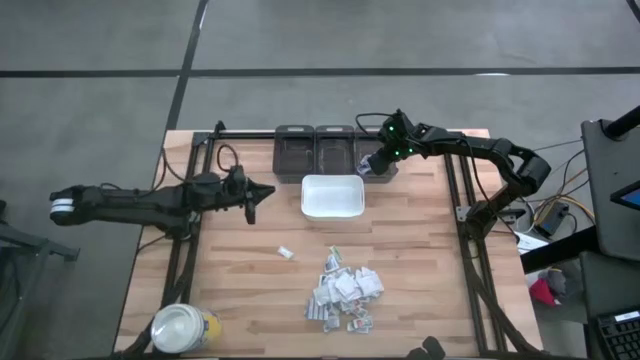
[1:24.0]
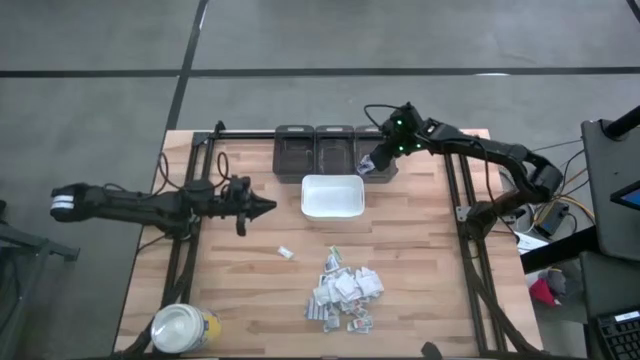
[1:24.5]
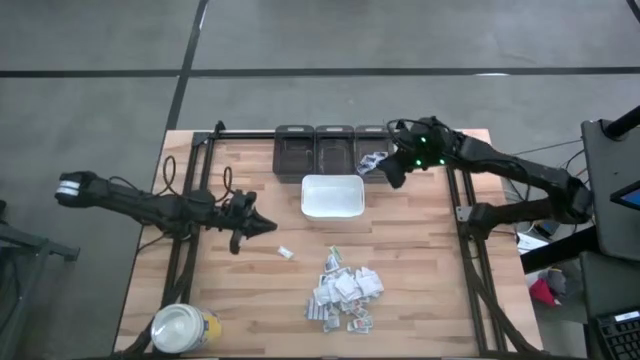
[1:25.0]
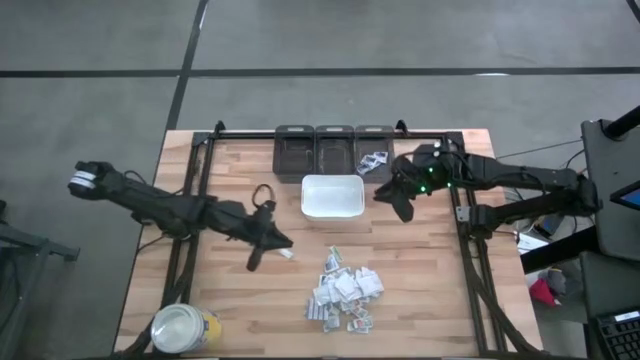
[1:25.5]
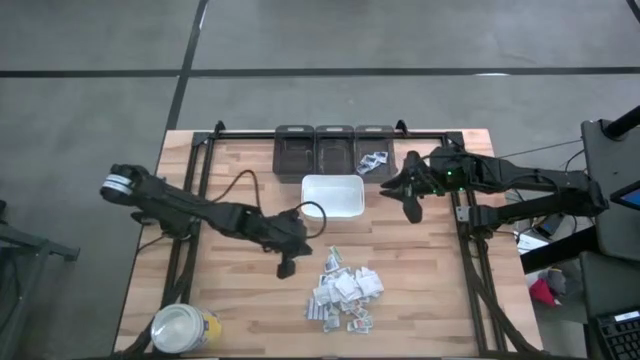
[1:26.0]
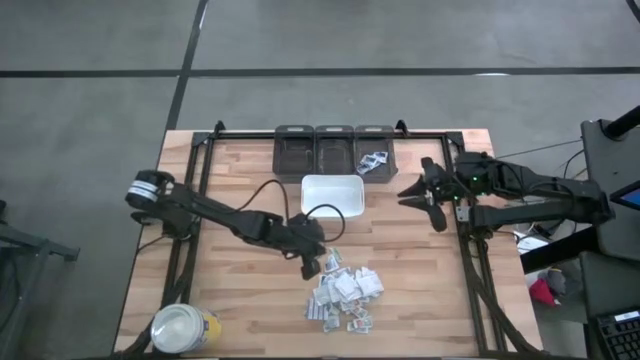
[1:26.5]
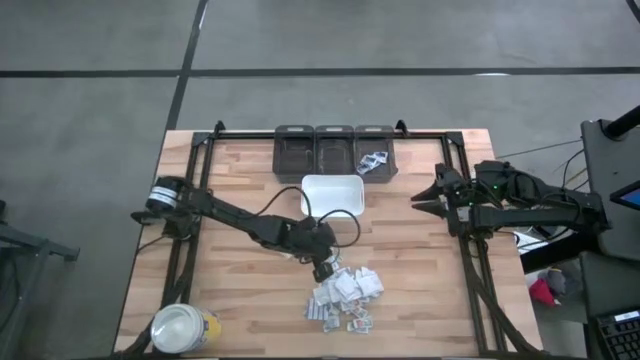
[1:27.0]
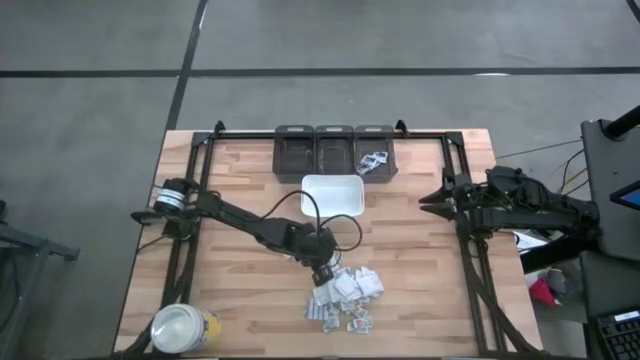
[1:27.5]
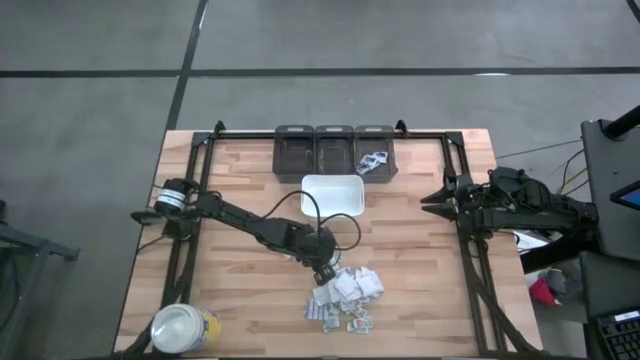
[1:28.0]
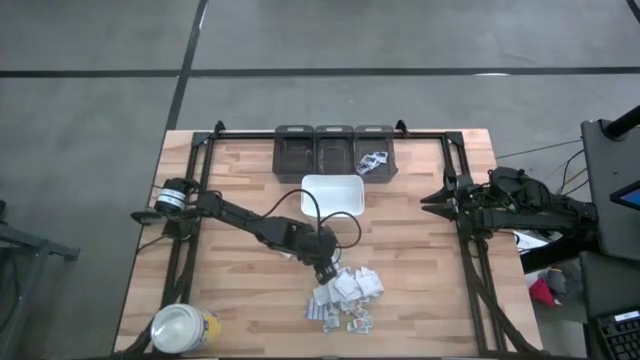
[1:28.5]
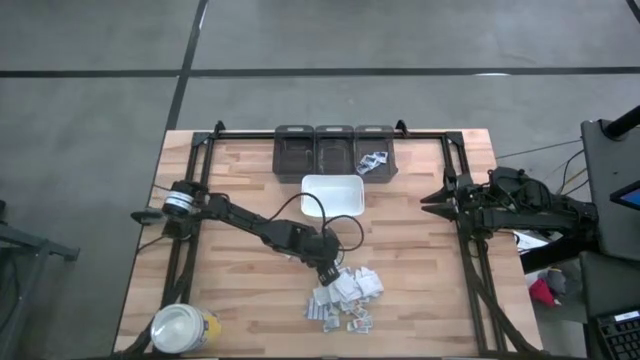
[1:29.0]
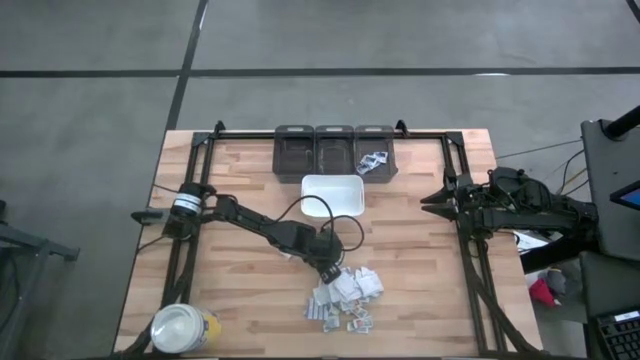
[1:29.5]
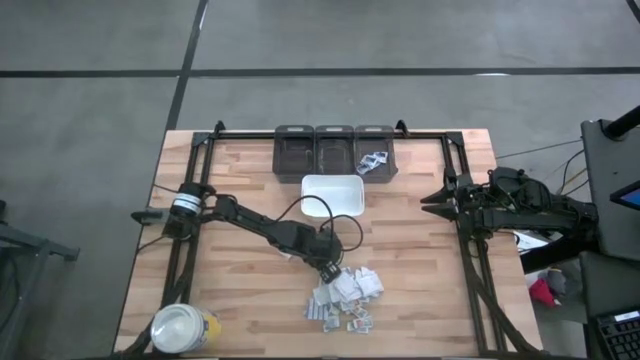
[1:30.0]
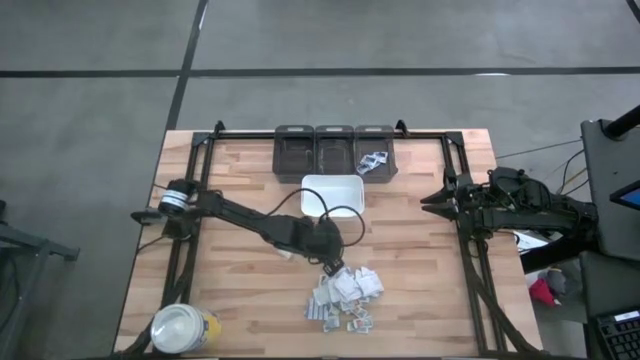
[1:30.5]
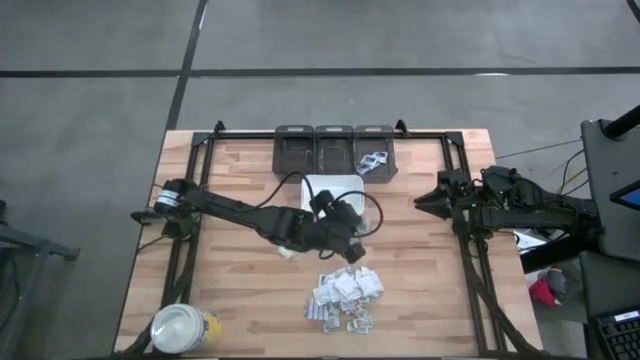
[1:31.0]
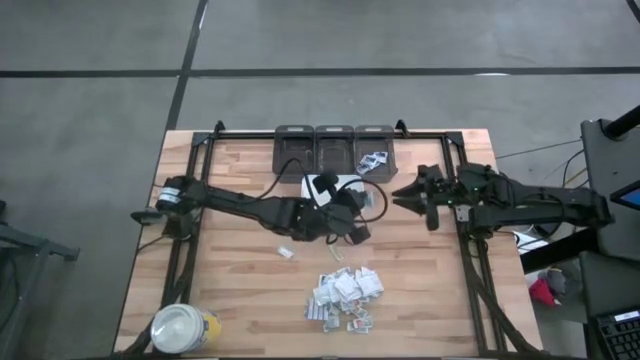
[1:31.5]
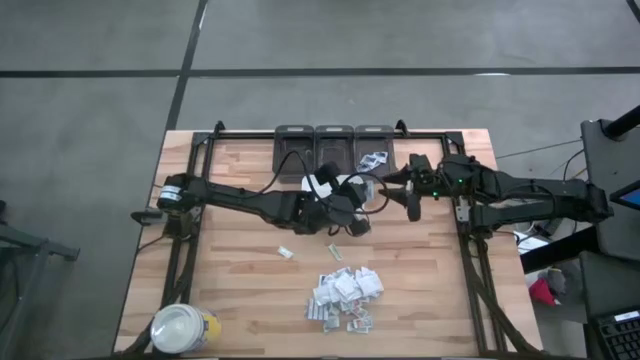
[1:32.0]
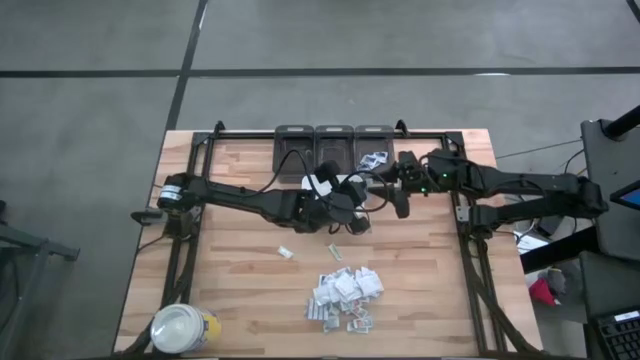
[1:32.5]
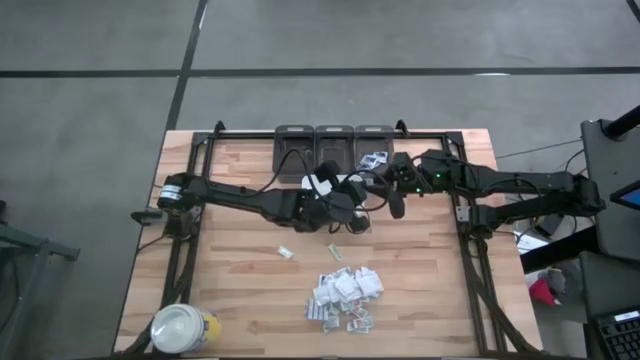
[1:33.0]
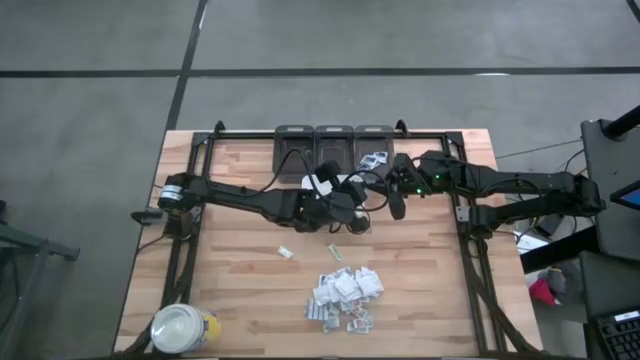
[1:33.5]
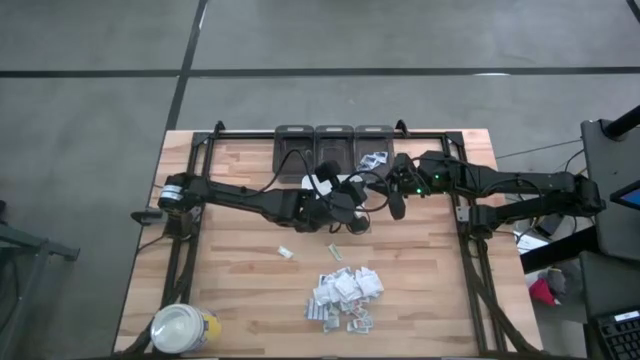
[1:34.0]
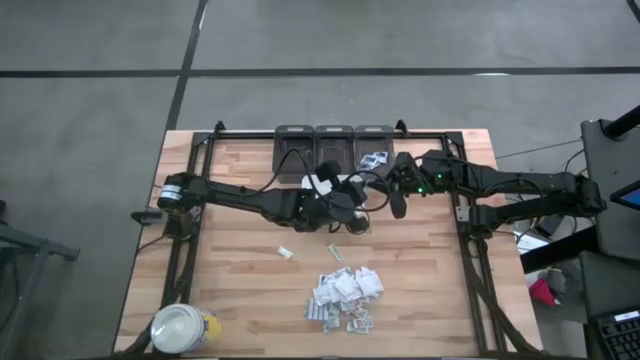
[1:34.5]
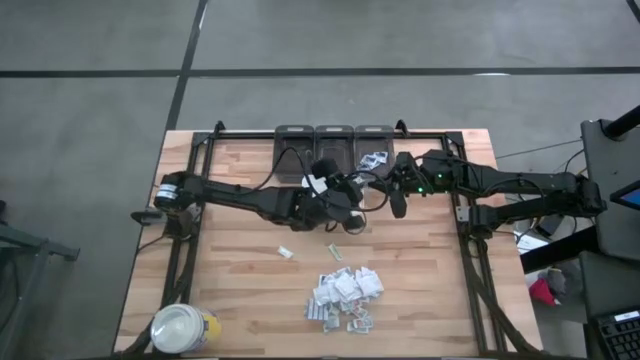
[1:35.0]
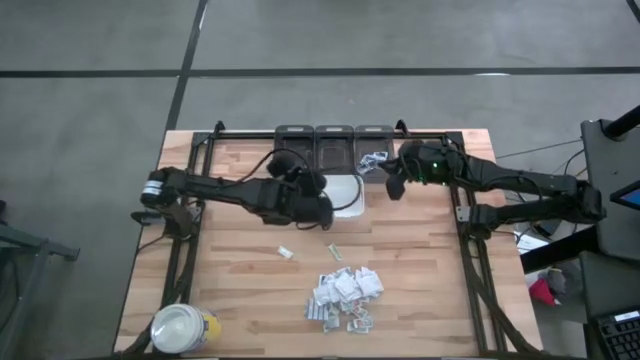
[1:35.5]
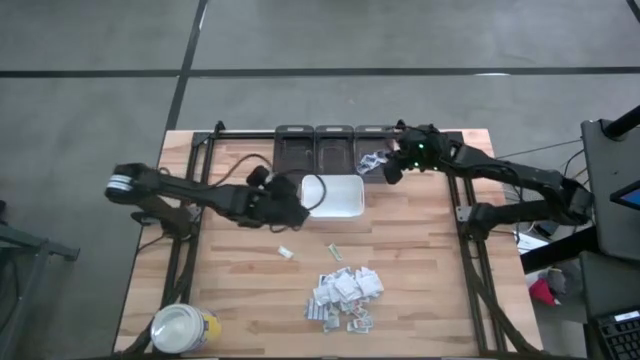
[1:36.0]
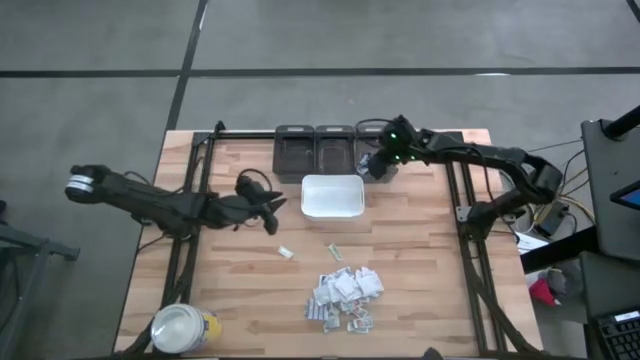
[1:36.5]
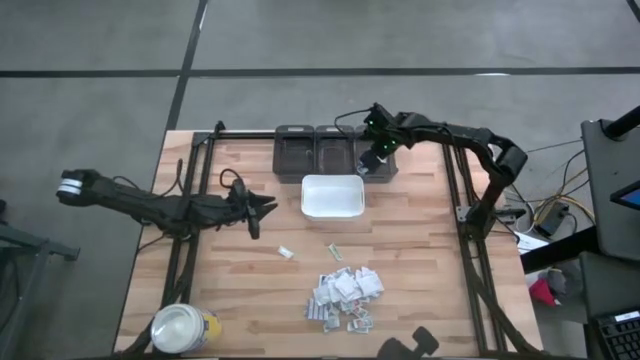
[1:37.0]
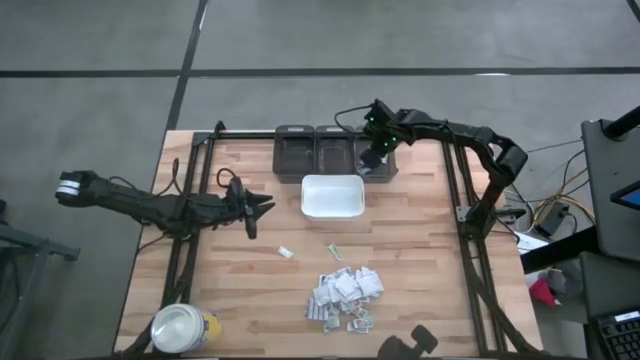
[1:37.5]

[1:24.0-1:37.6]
Task: Pick & Place First Aid Supplies
Put the white alcohol pad into the right black bin

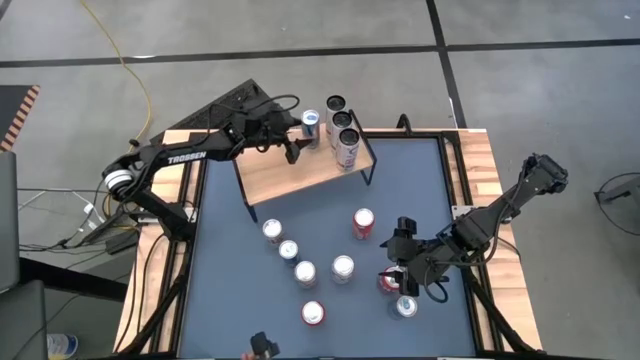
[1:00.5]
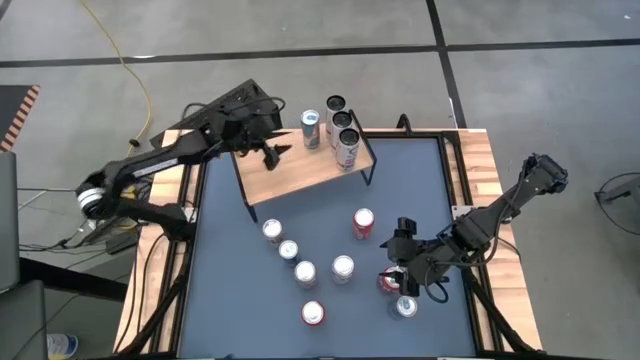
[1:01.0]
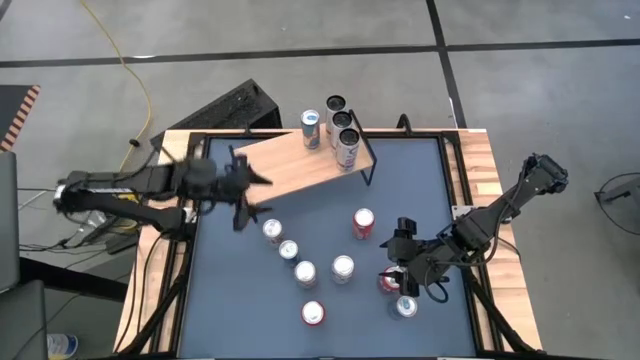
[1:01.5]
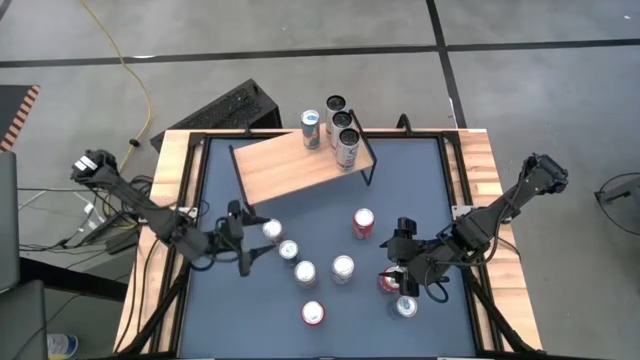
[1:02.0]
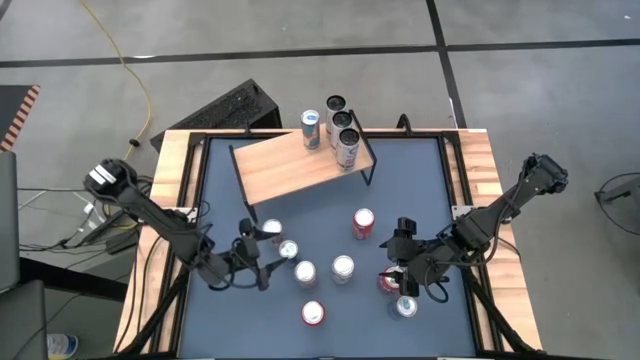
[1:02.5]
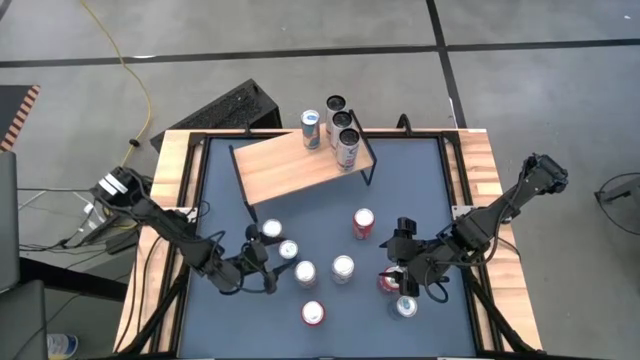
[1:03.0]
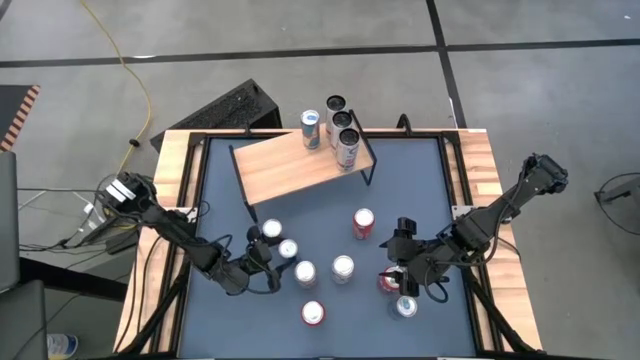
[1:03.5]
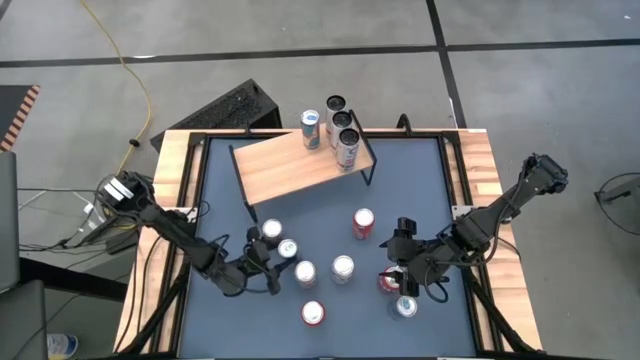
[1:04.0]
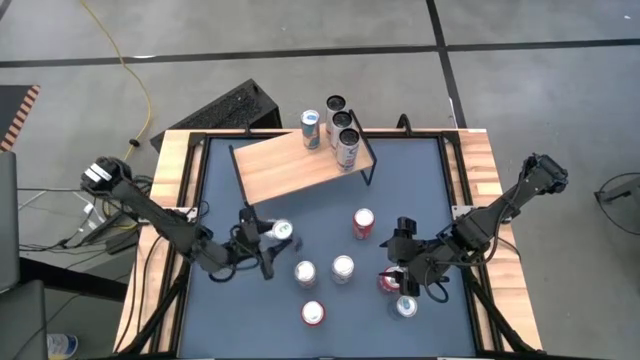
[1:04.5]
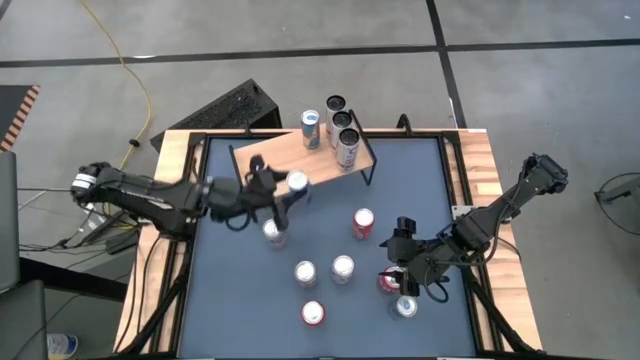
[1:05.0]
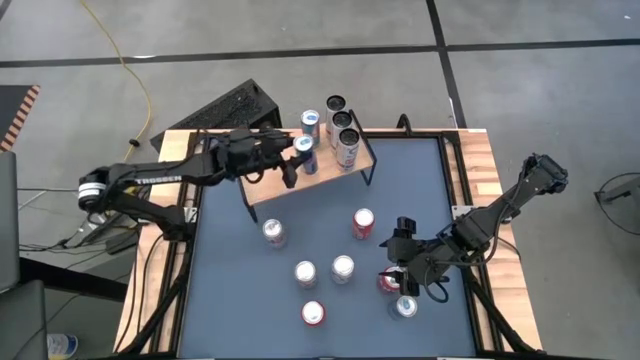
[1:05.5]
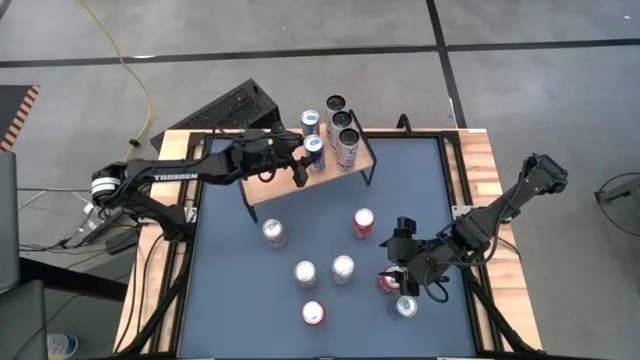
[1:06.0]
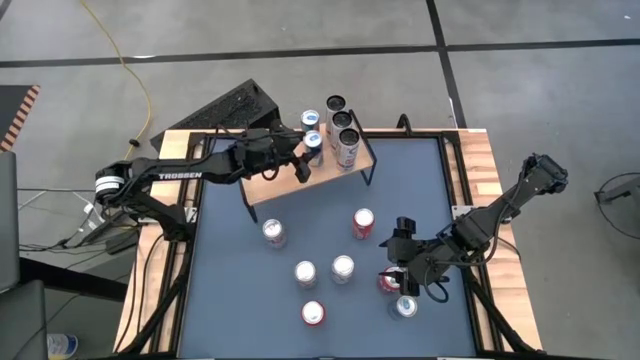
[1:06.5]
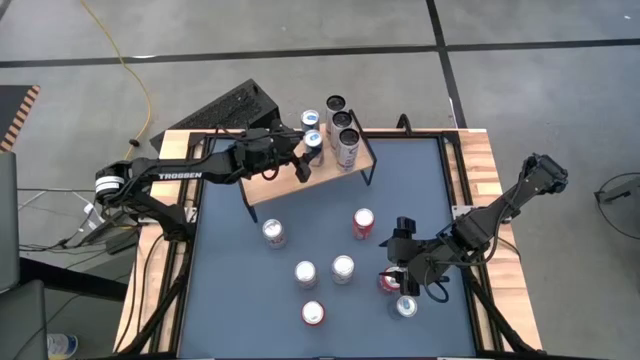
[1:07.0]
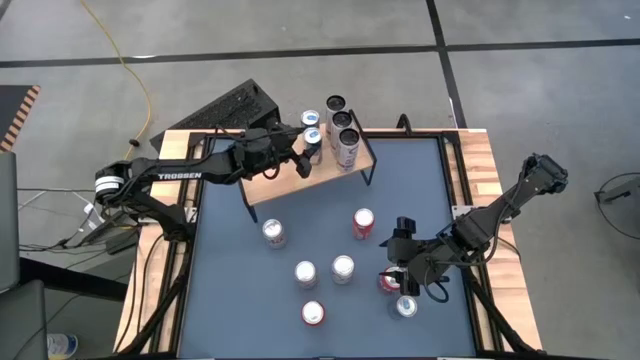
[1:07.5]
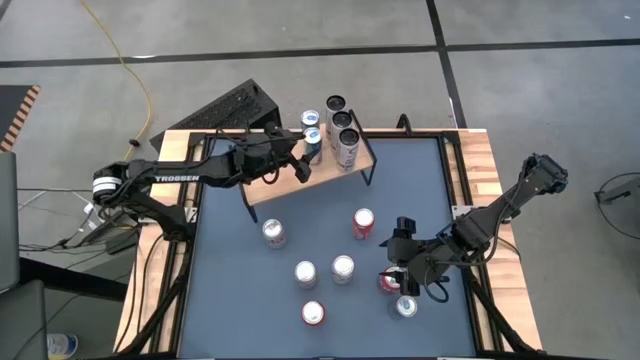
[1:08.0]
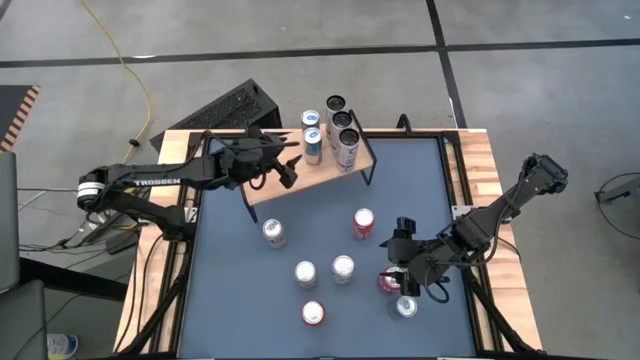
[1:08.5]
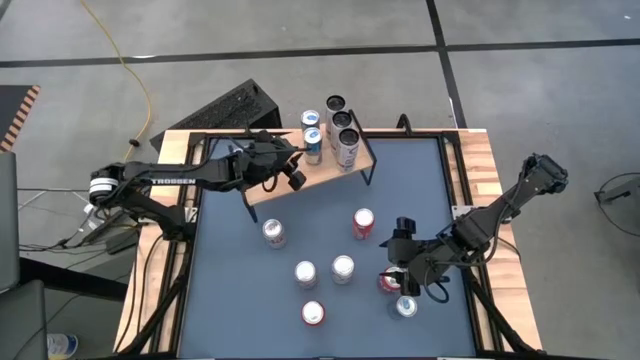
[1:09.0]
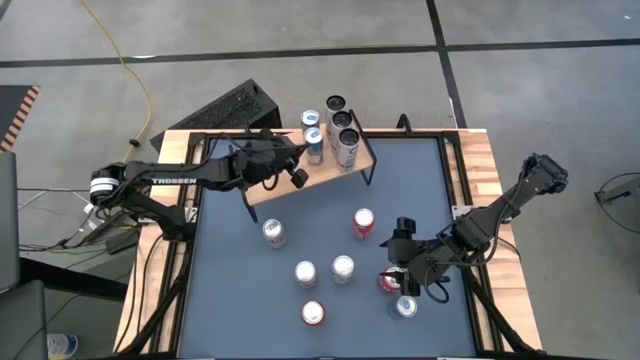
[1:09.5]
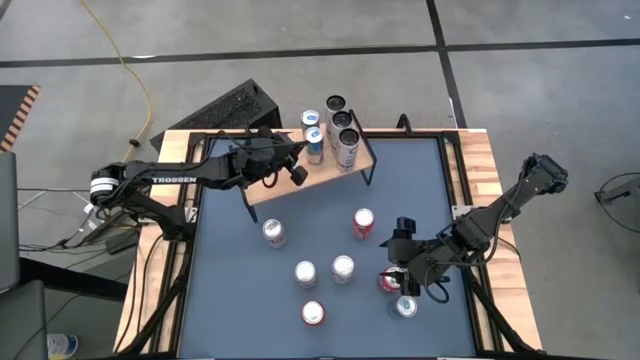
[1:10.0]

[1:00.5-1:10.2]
Task: Place canned beverage on shelf
Put the top blue soda can on the shelf aligned with the other blue soda can
